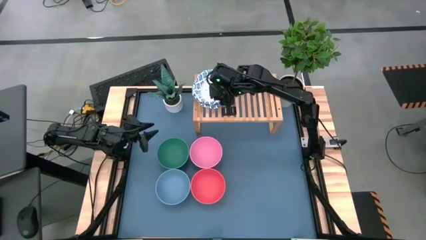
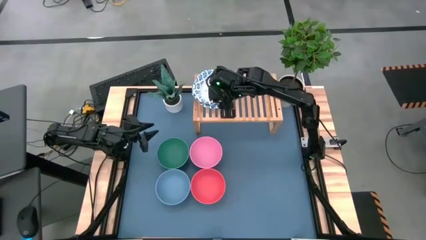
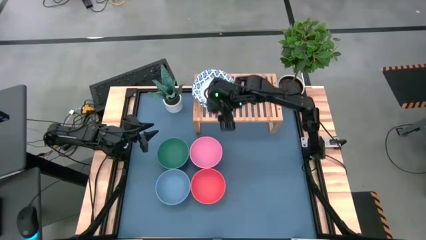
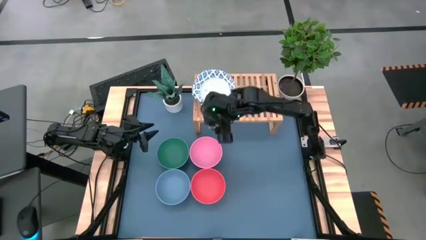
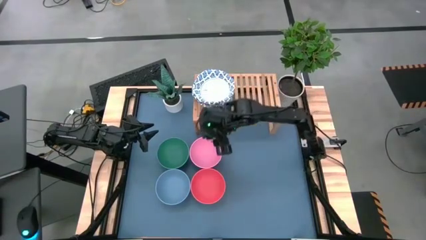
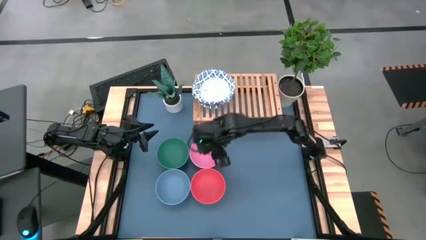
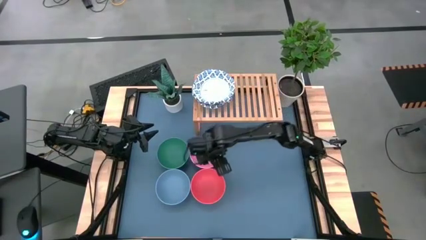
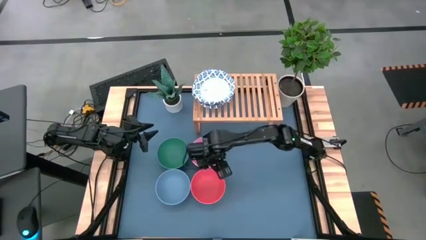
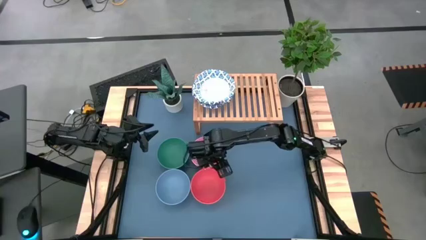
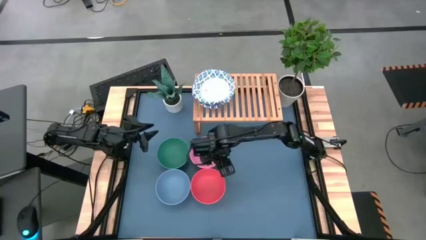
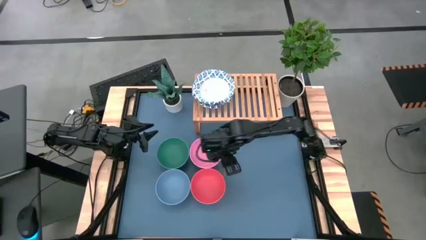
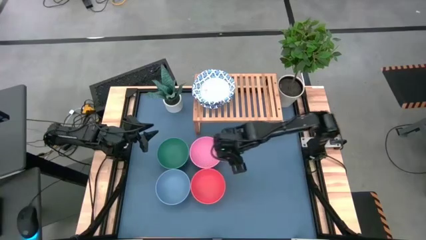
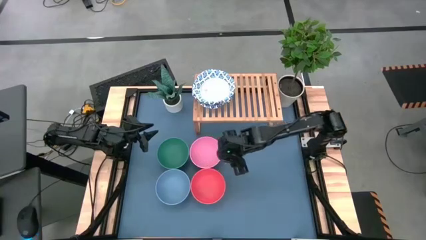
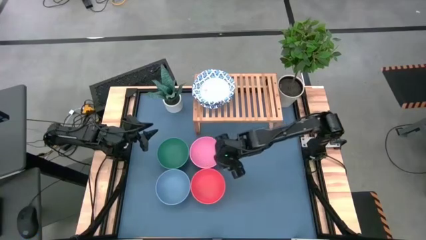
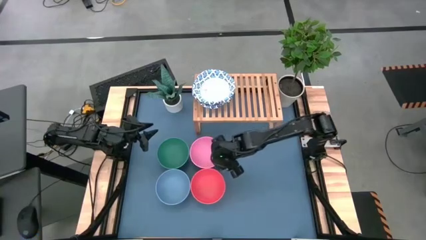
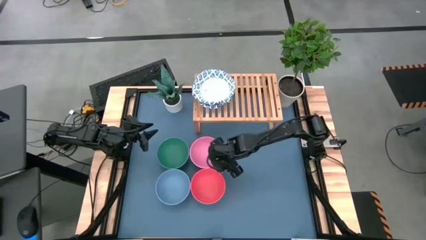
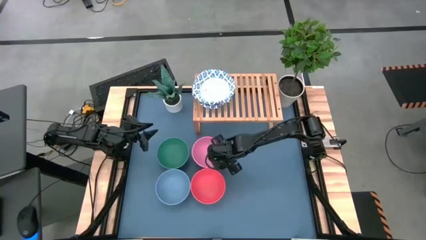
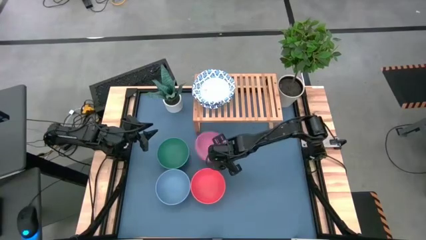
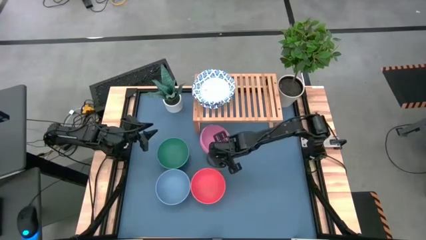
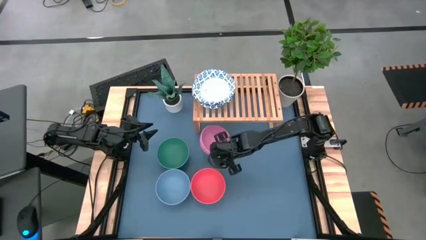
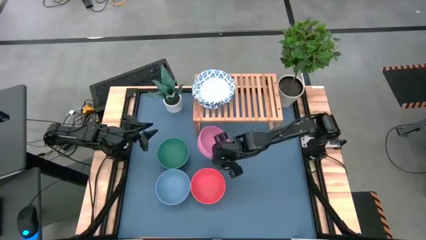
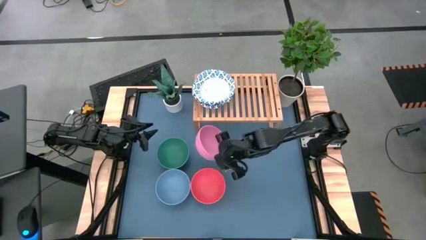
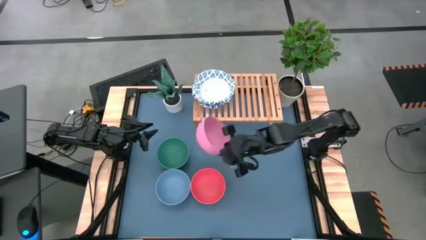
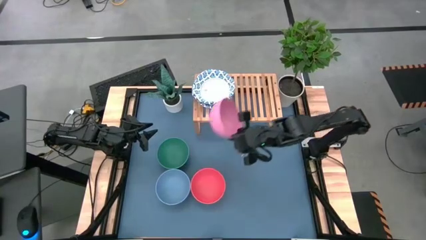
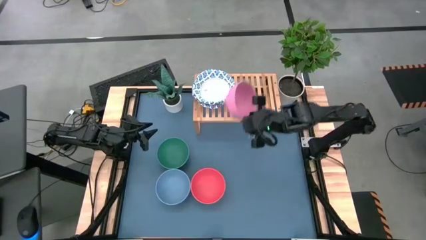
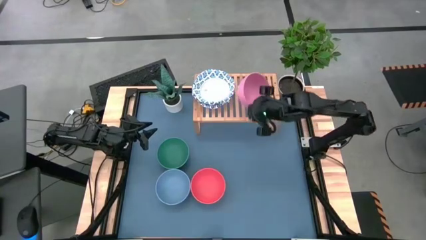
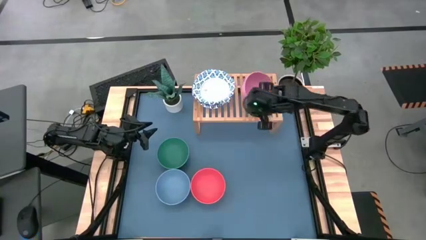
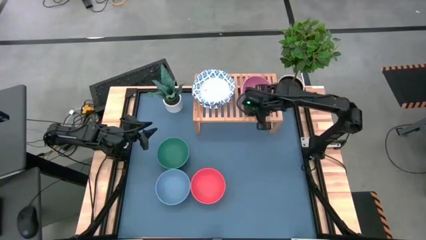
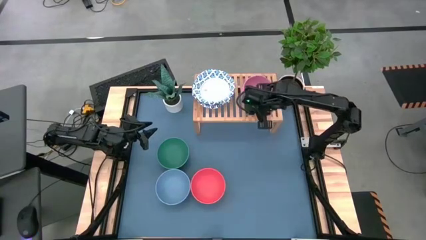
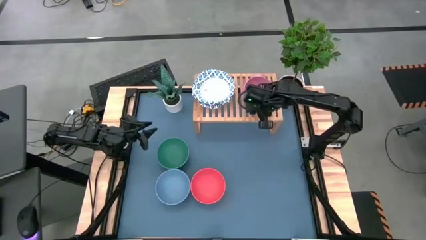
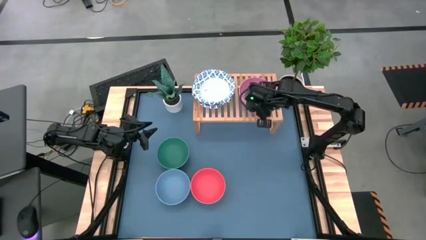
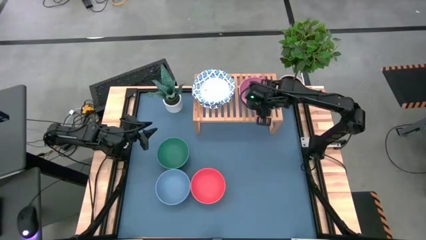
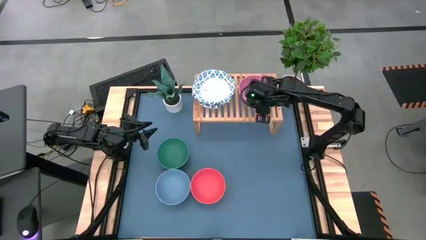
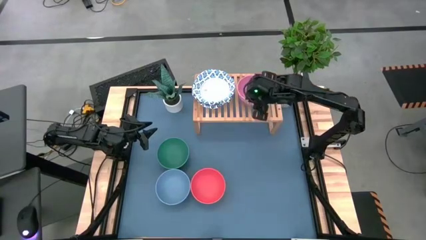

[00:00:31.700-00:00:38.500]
Task: Place and stack bowls onto a shelf
Put the pink bowl on the shelf

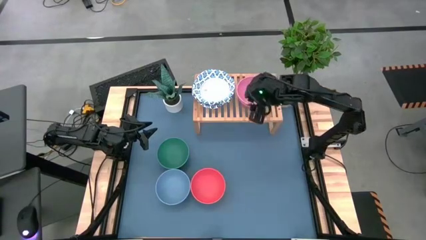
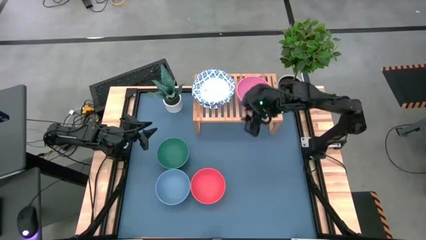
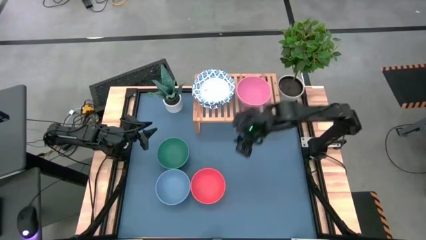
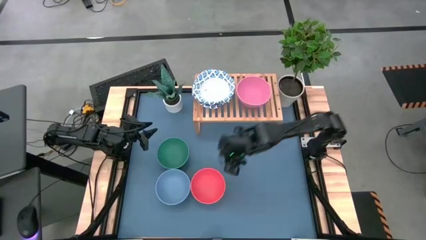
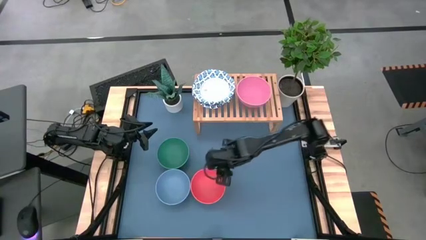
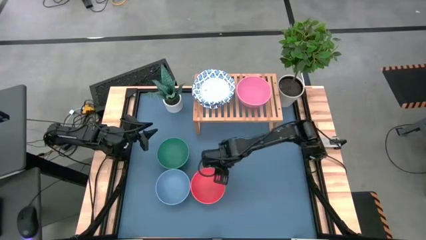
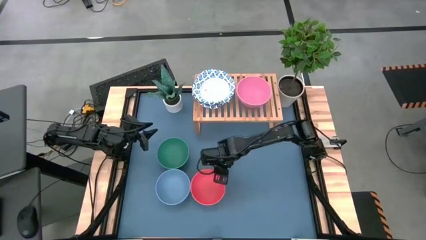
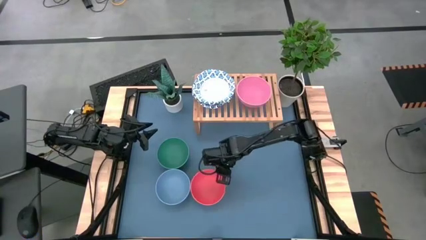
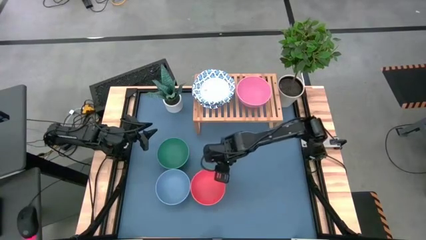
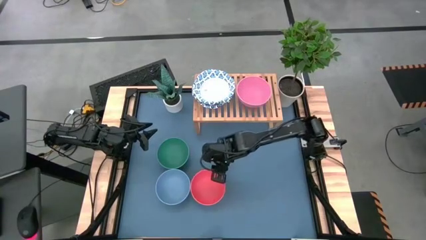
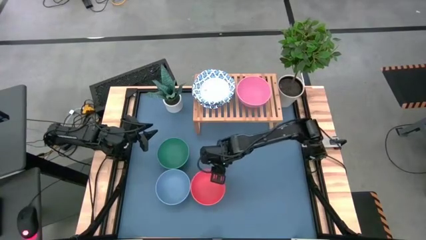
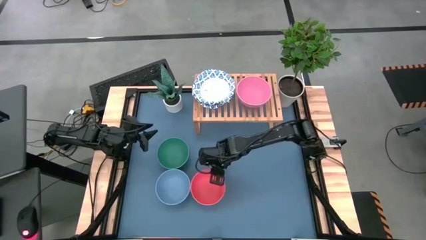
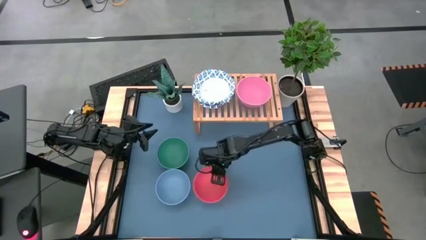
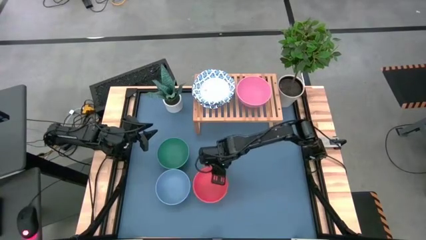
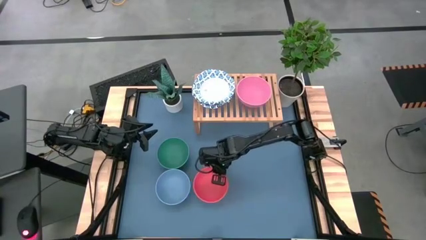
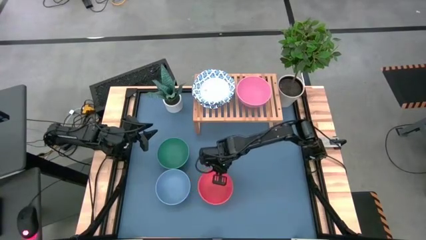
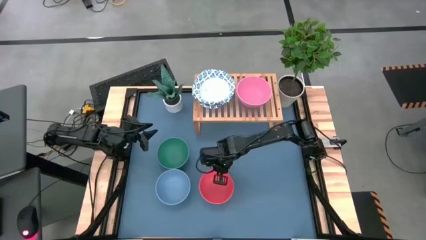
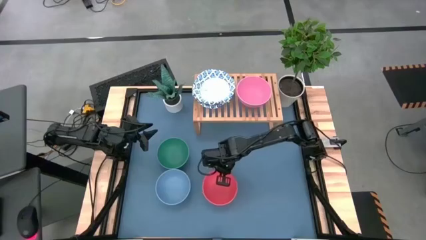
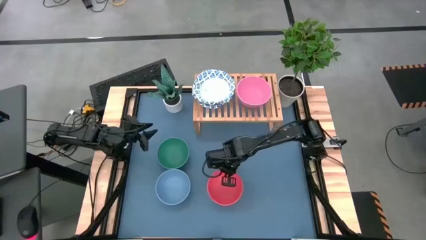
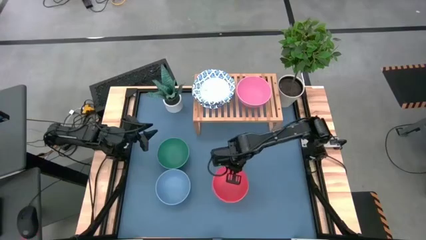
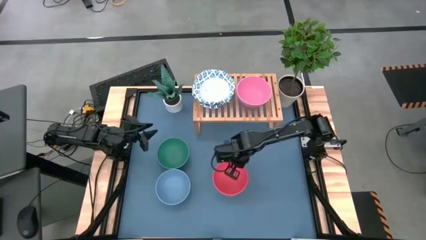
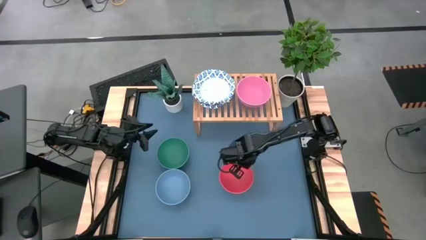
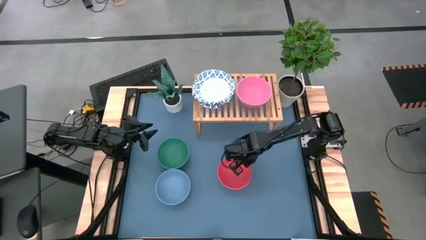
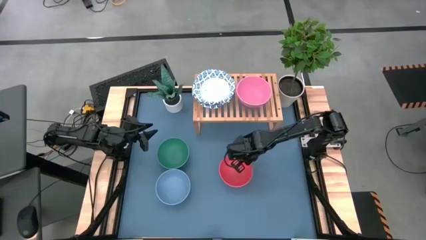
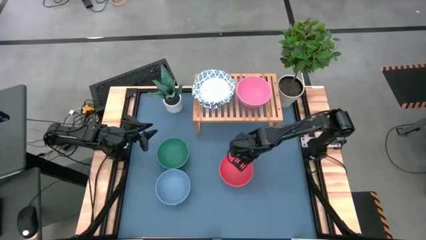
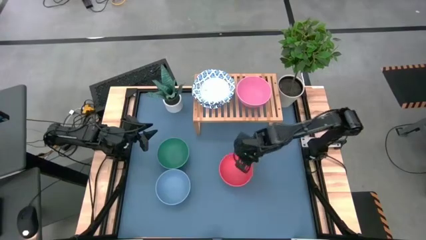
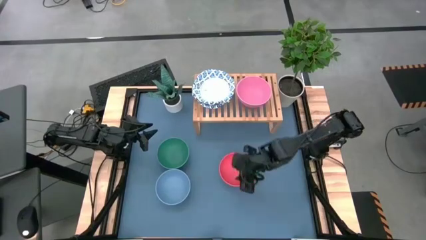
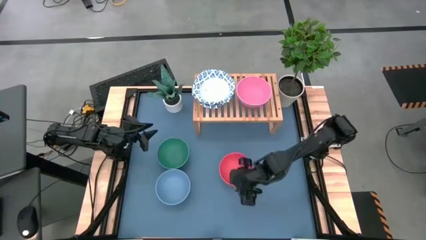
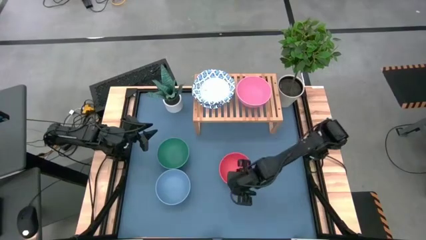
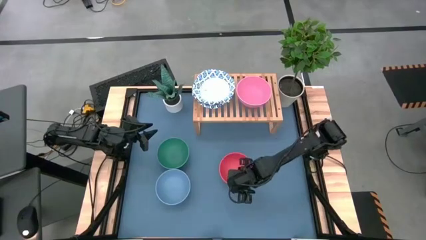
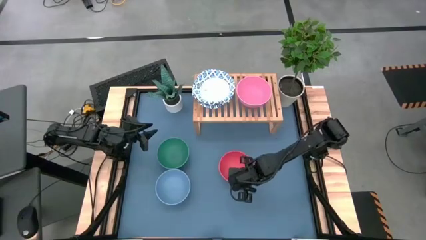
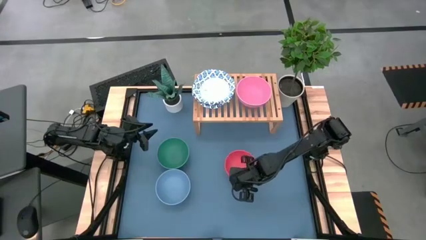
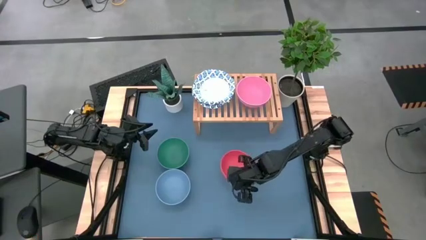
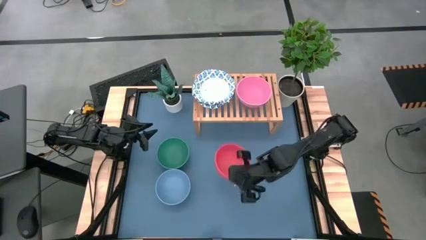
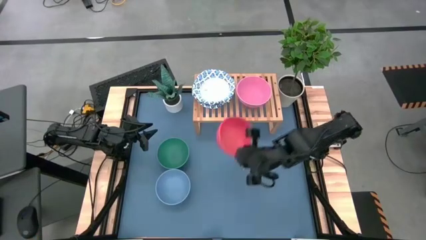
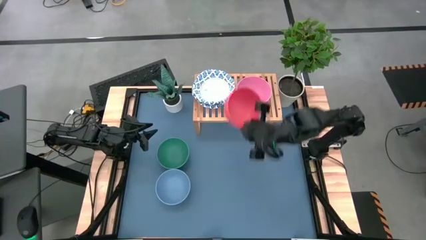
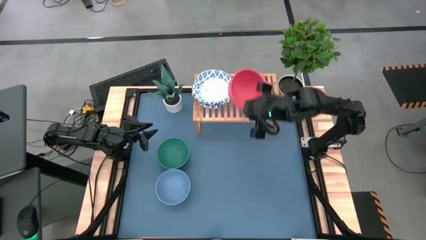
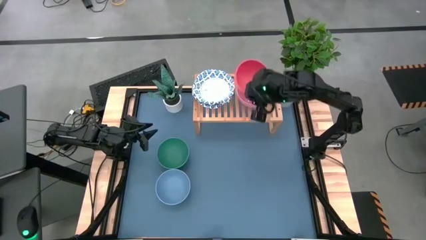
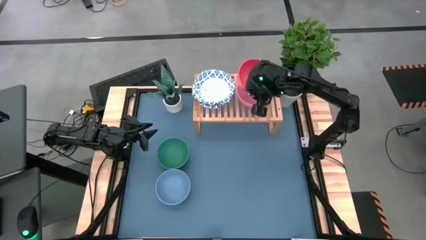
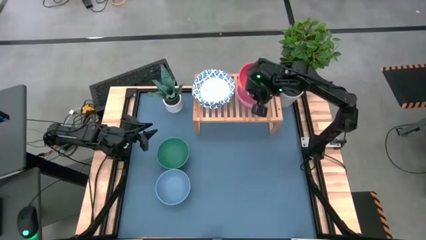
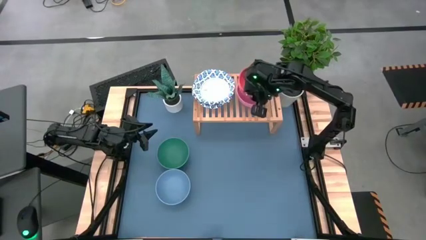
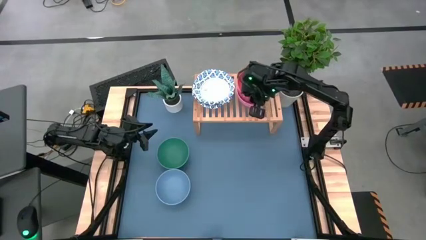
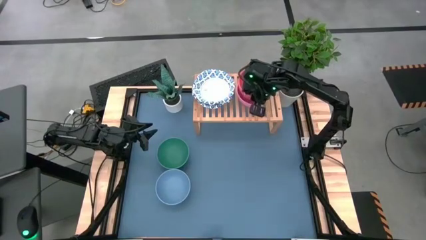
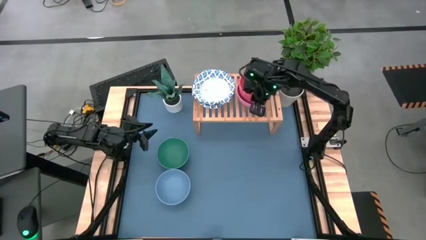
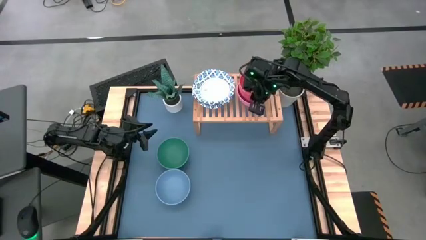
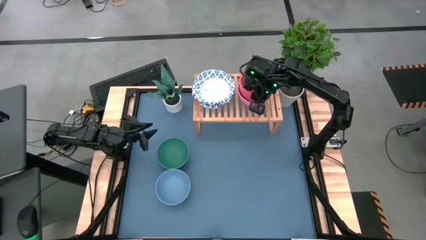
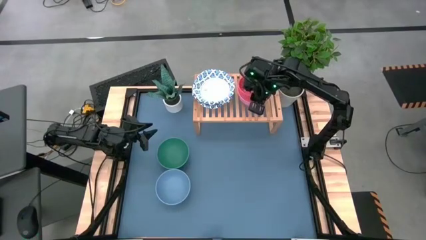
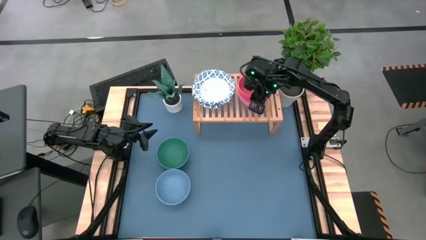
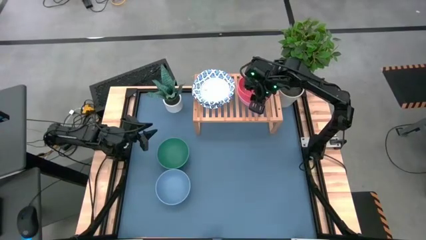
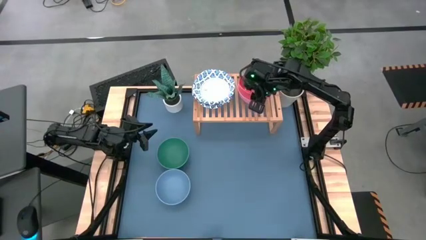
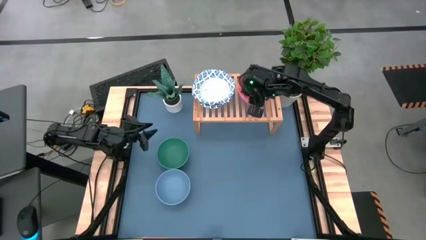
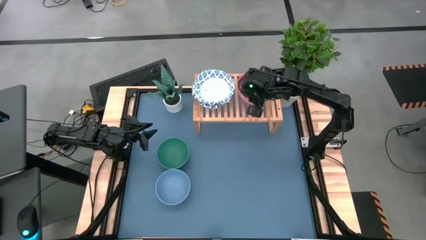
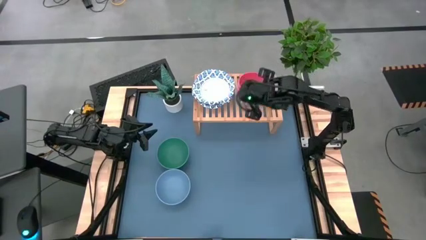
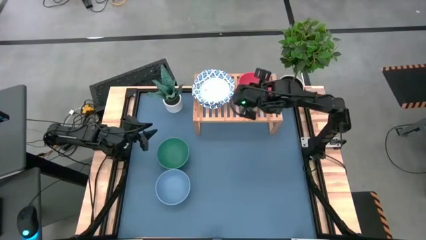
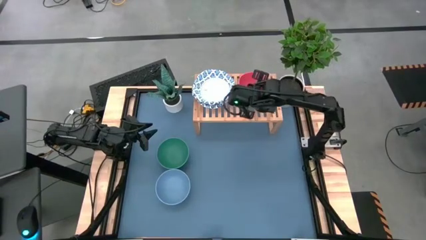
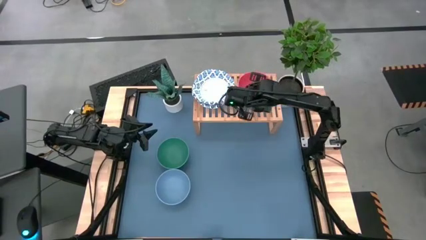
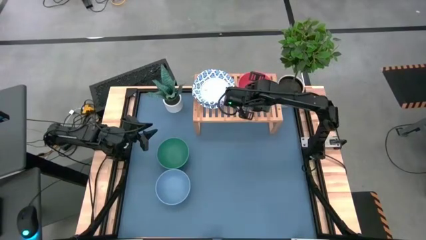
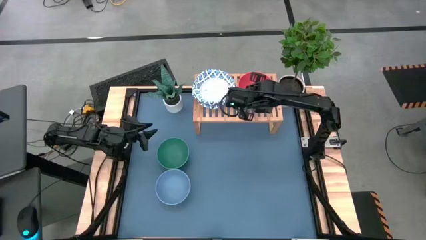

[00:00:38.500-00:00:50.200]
Stack the orange bowl on top of the pink bowl on the shelf
